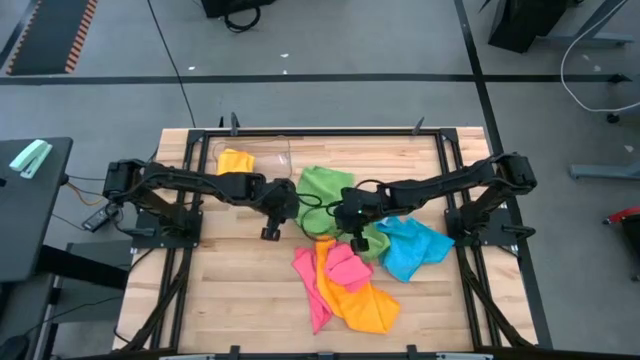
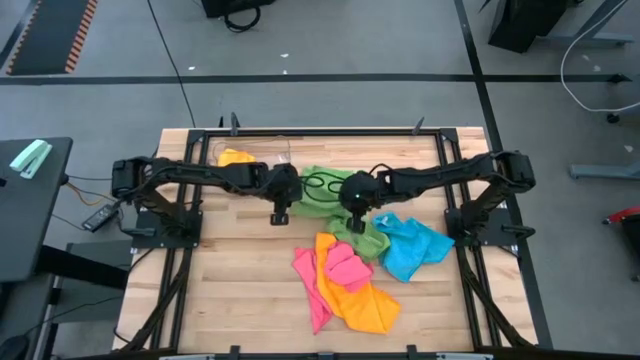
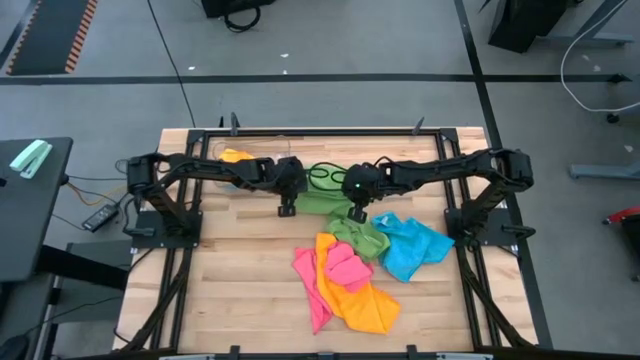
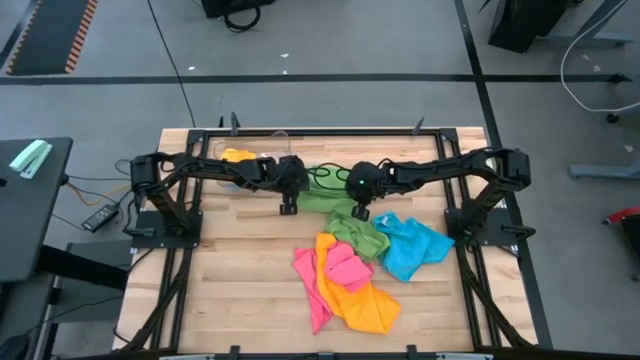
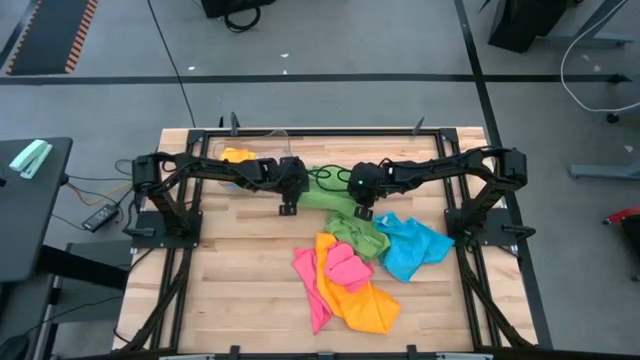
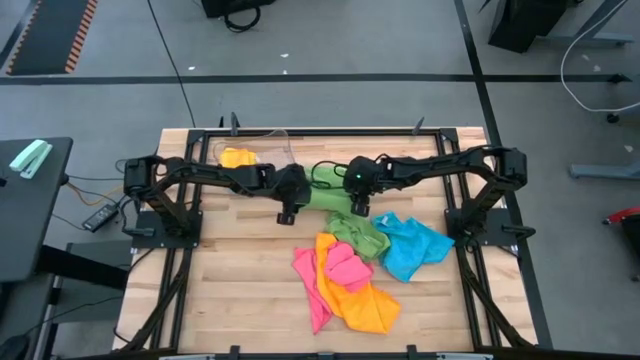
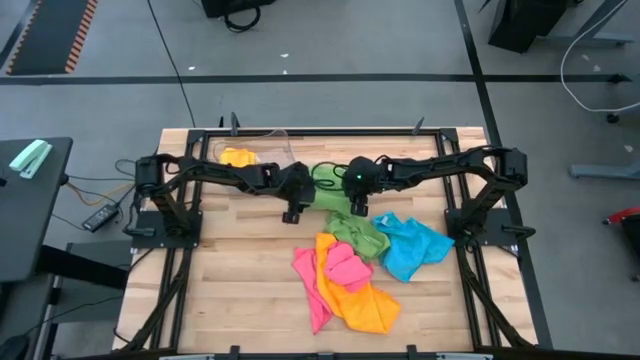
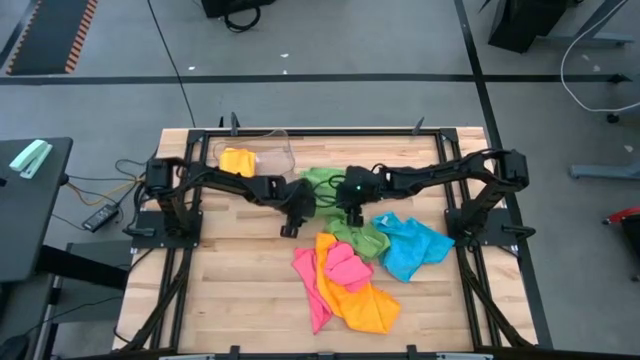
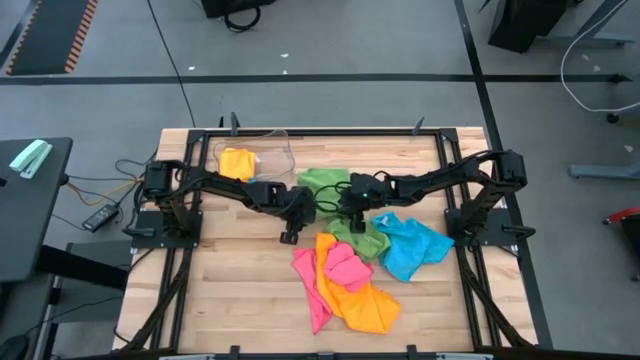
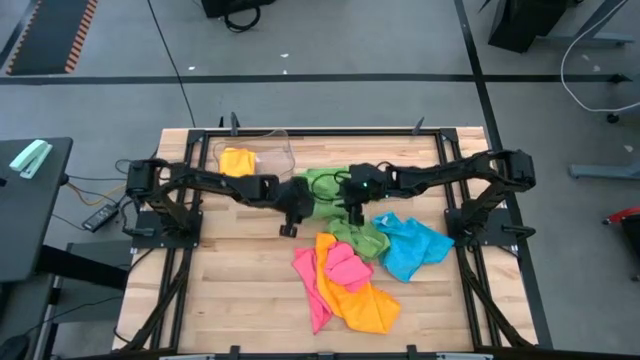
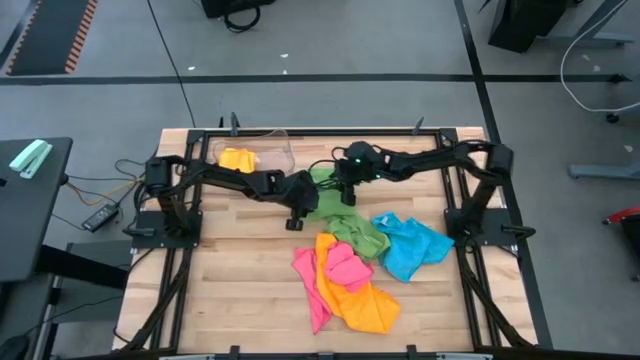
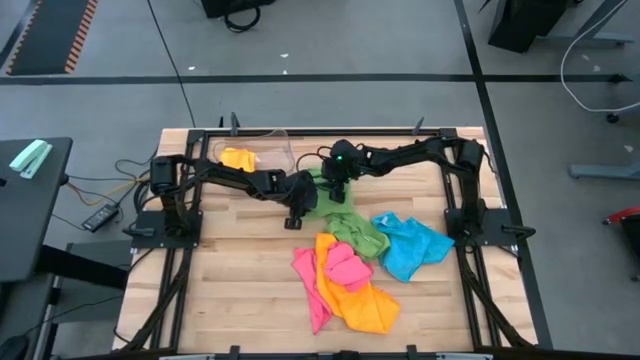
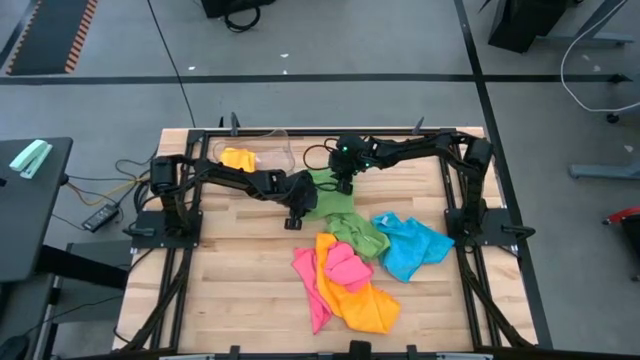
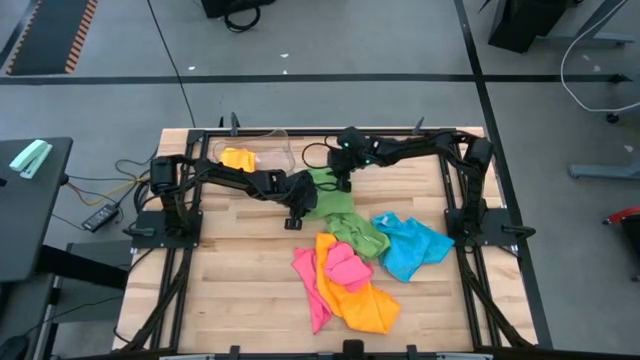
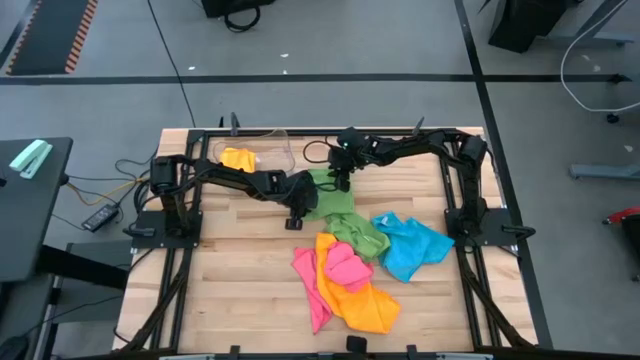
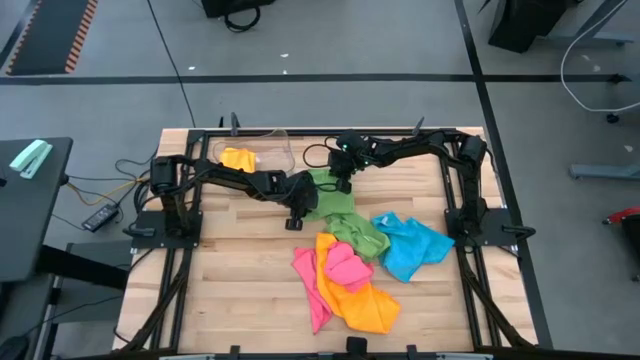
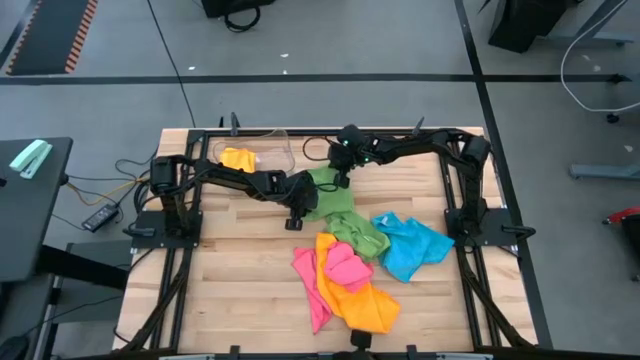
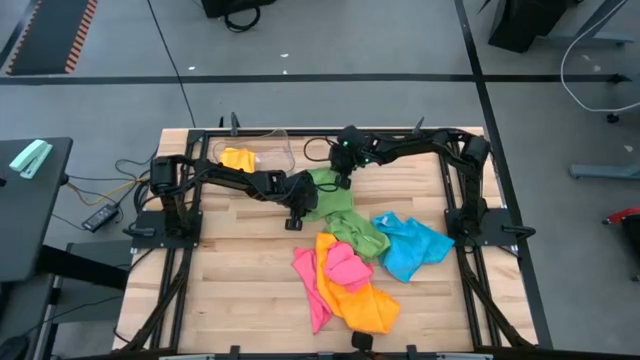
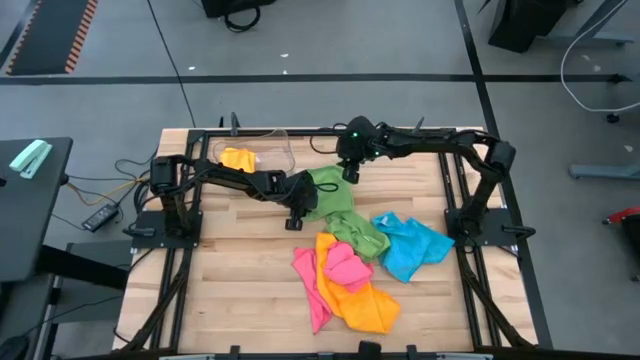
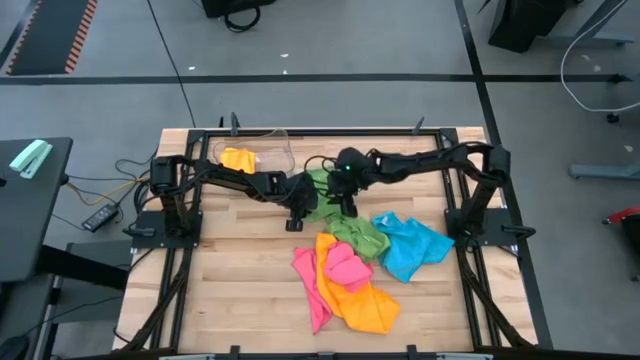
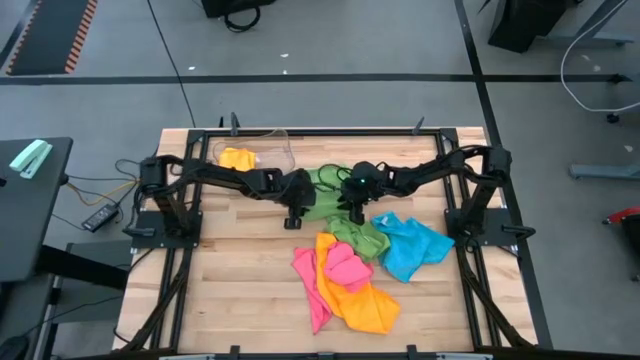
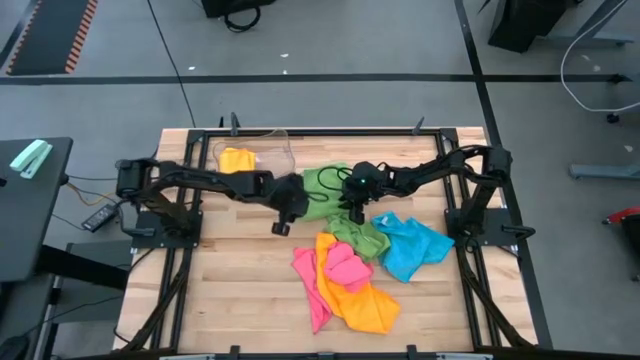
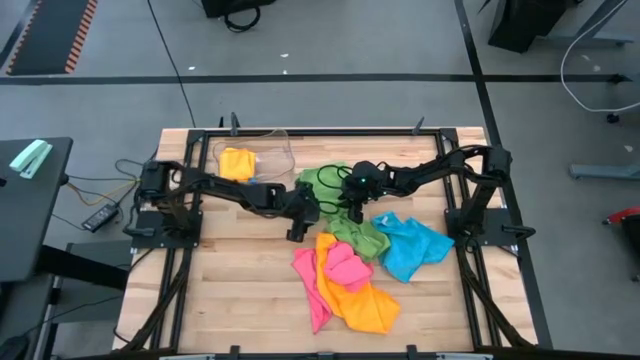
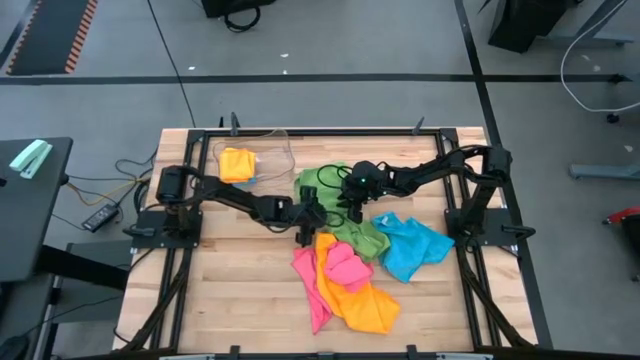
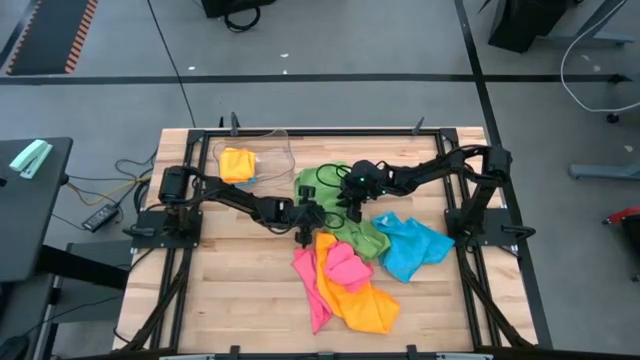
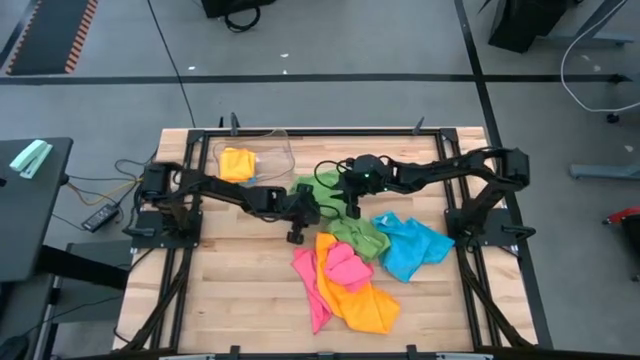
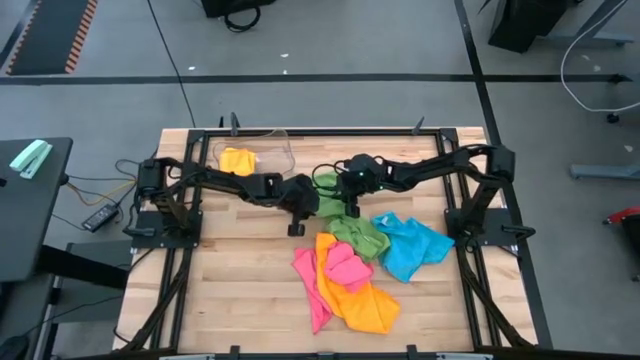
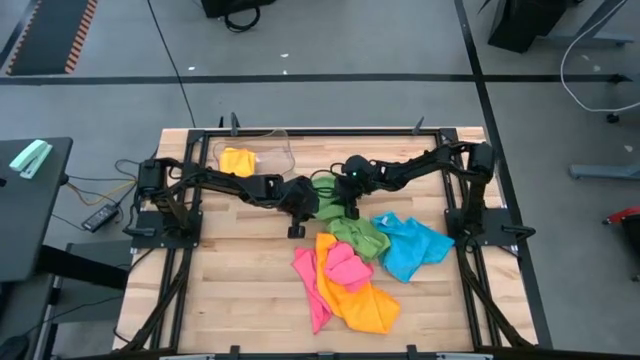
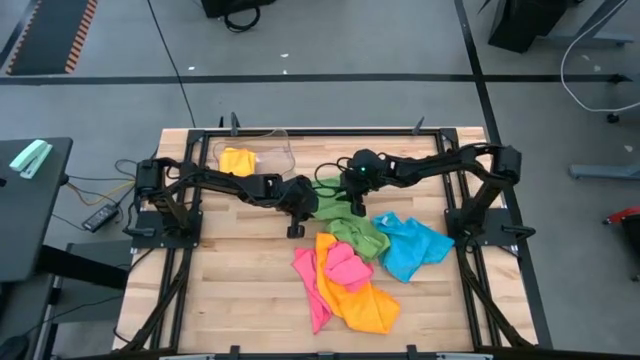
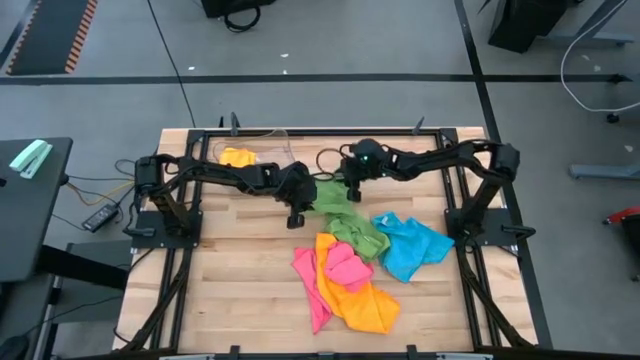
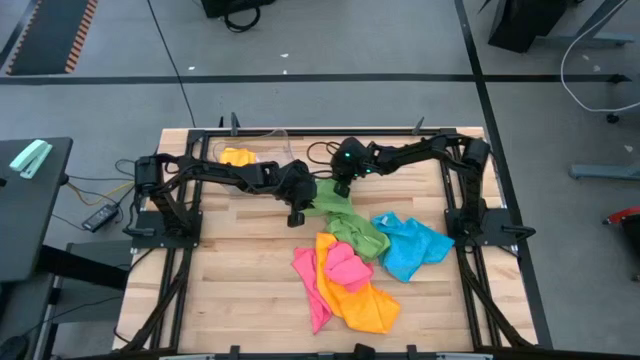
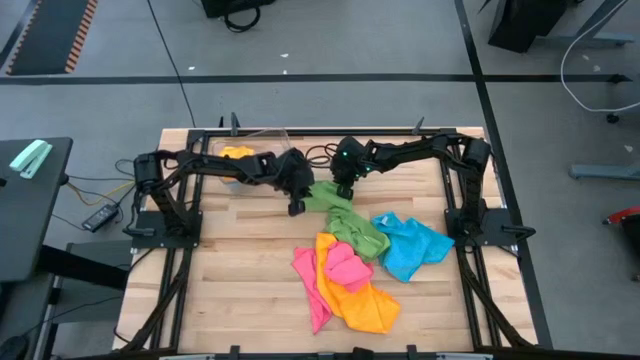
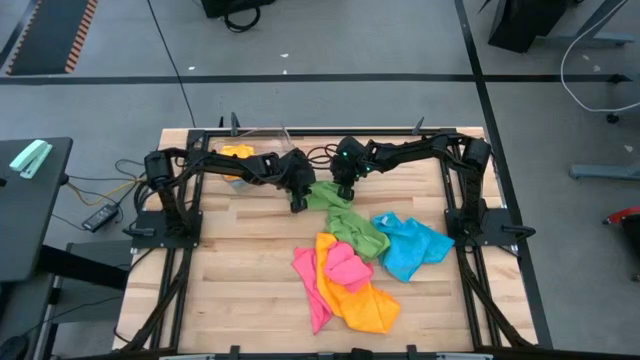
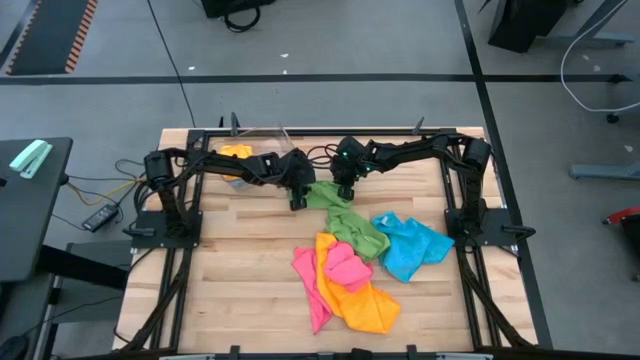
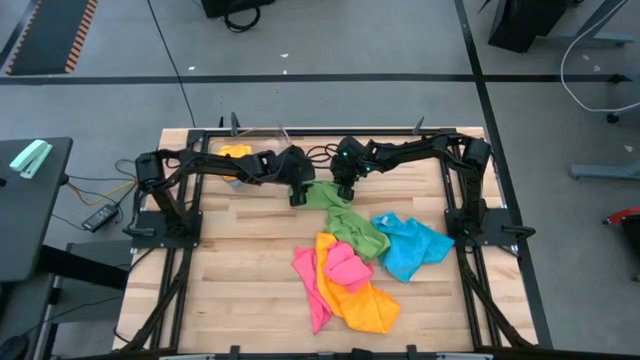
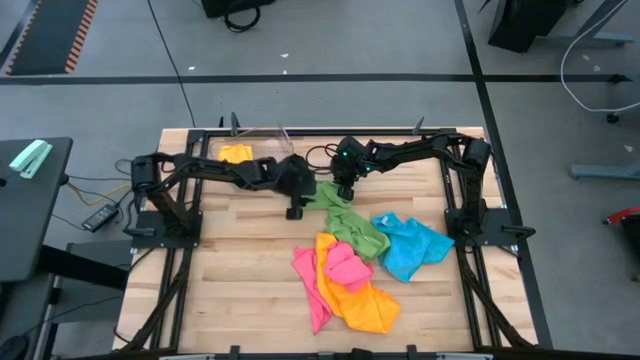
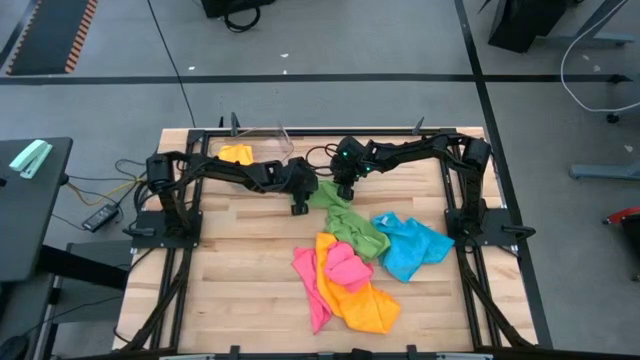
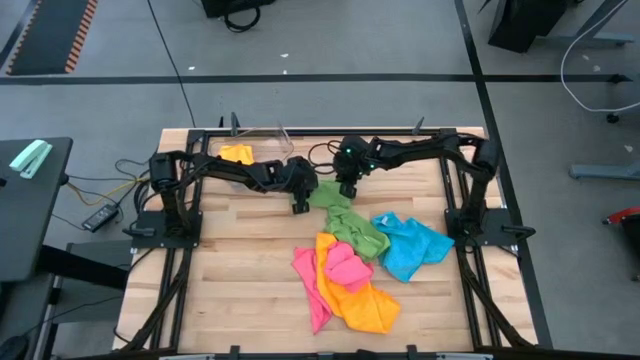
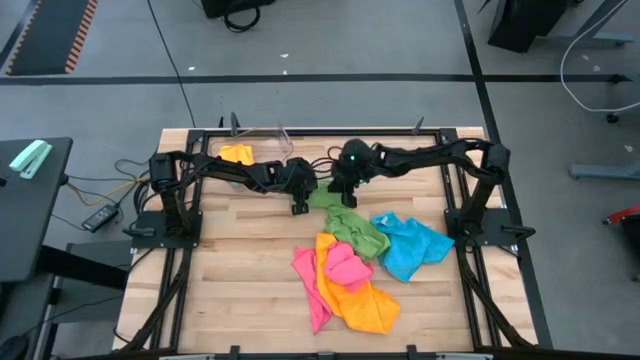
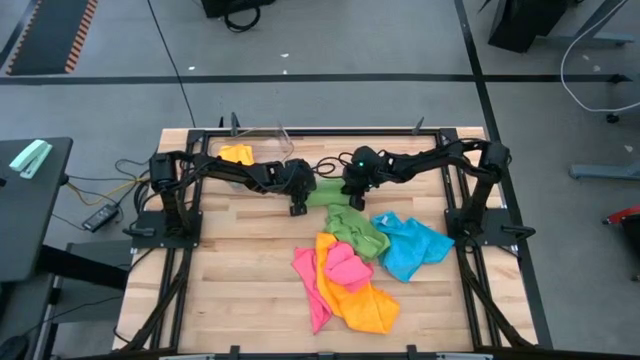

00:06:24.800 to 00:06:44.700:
Task: Fold microfiber towels
Fold the left green microfiber towel
